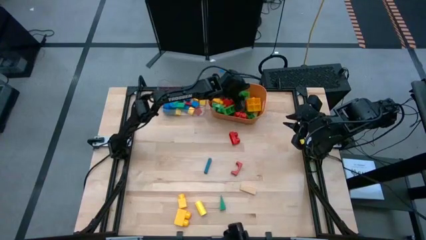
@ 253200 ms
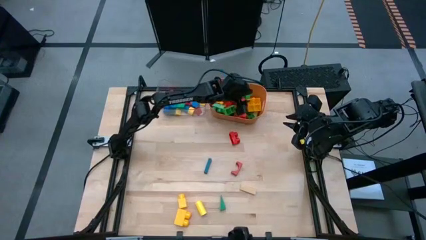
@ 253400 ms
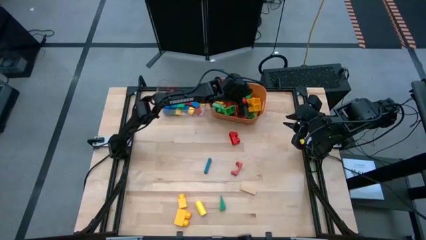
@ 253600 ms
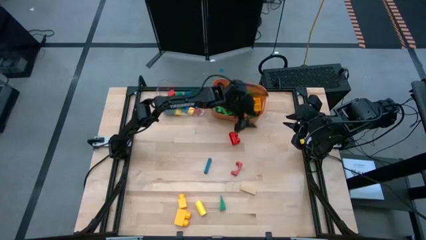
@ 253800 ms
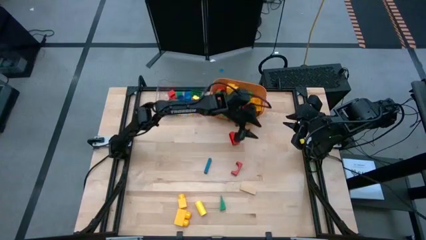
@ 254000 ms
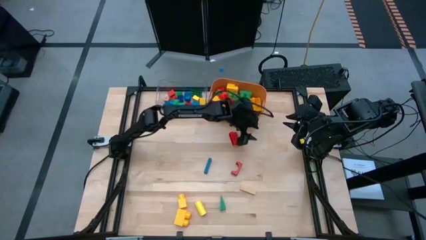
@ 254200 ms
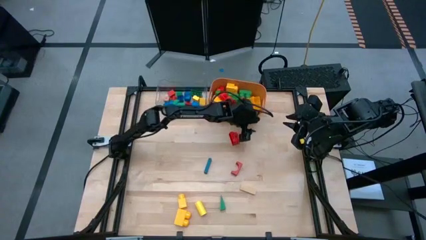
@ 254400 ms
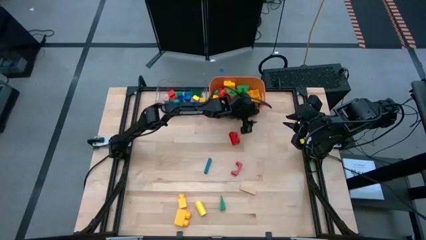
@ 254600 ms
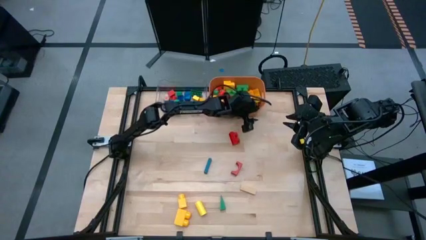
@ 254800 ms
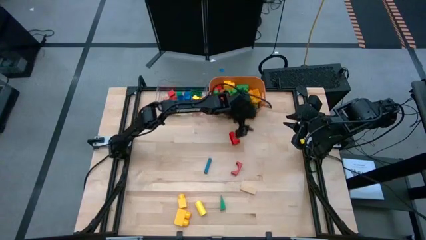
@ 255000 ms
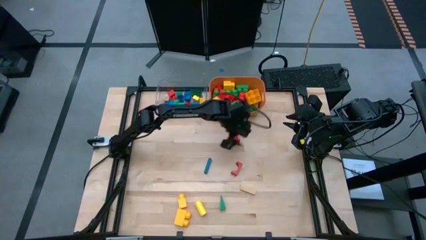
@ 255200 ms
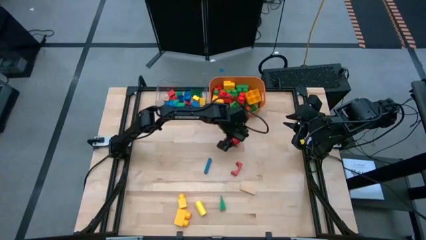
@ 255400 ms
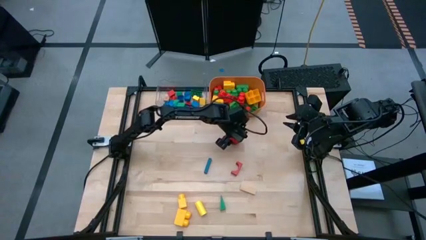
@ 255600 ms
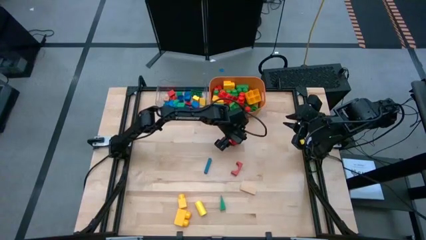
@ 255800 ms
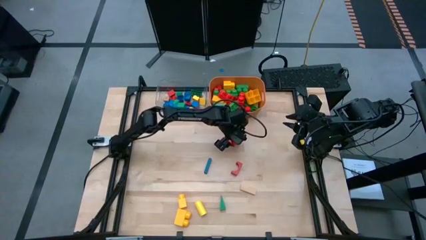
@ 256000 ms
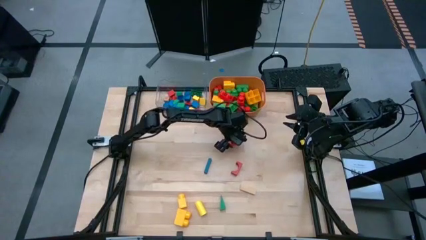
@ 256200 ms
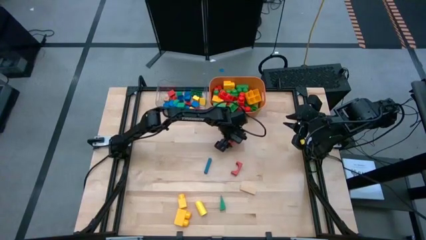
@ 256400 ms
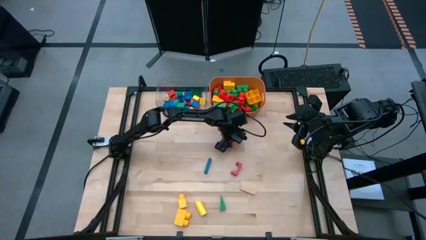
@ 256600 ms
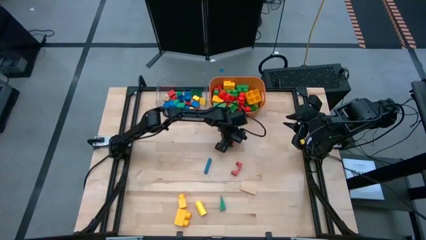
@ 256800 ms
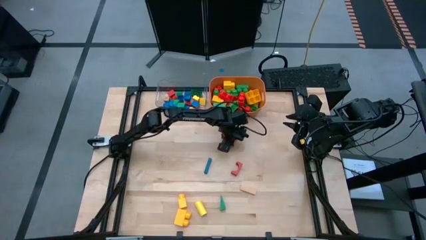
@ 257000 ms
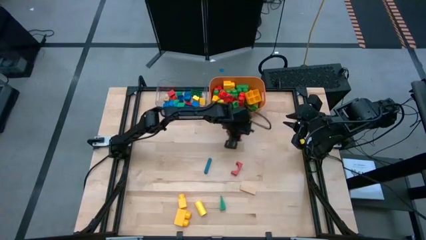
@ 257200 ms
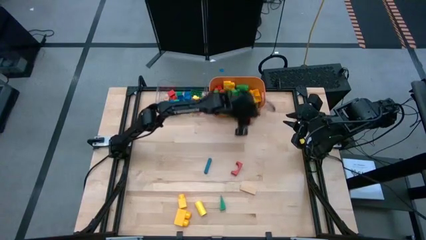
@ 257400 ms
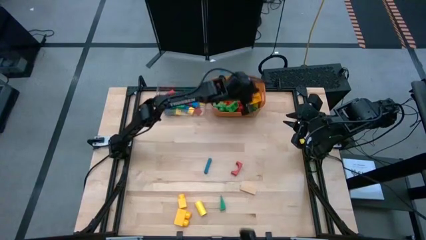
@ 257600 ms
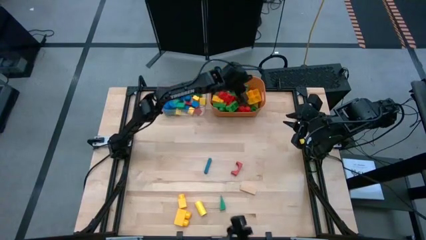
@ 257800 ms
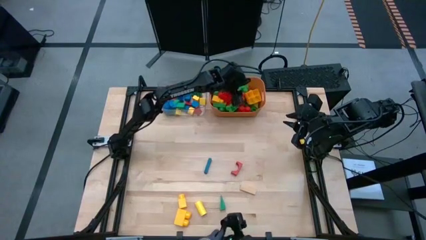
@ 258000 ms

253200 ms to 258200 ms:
Task: Sort blocks by size
Put the big red game piece into the orange bin

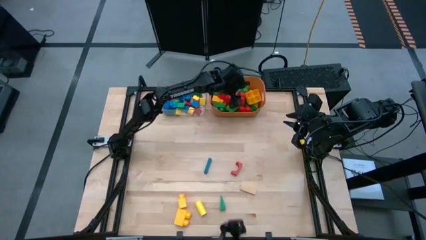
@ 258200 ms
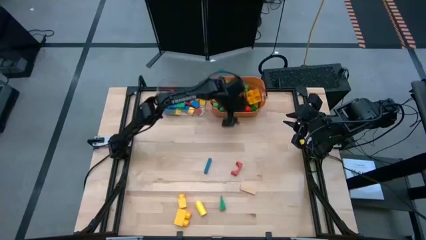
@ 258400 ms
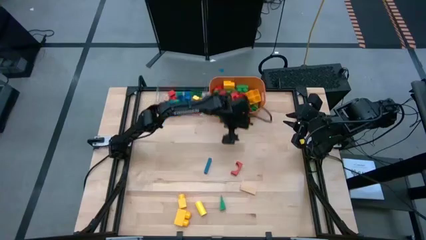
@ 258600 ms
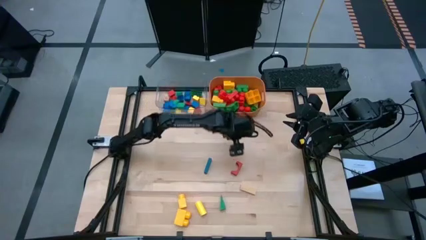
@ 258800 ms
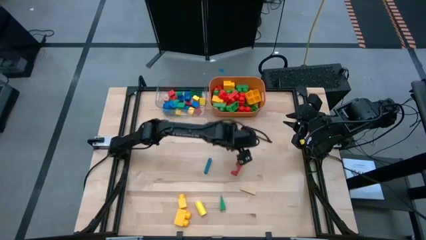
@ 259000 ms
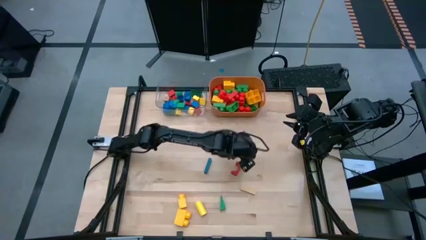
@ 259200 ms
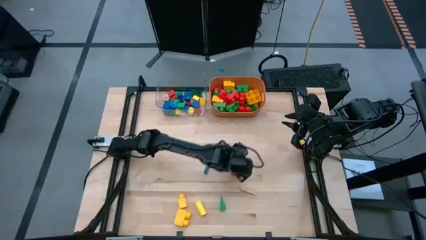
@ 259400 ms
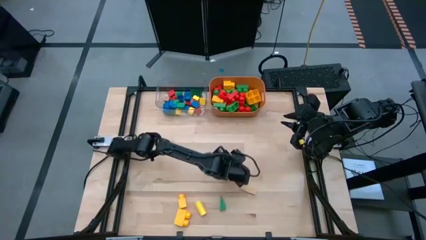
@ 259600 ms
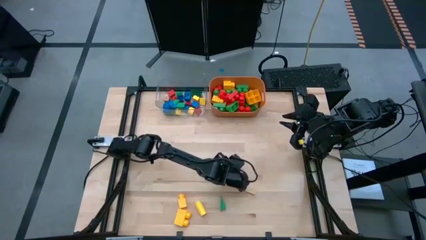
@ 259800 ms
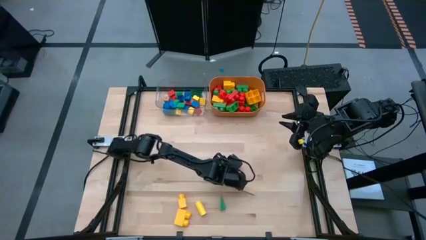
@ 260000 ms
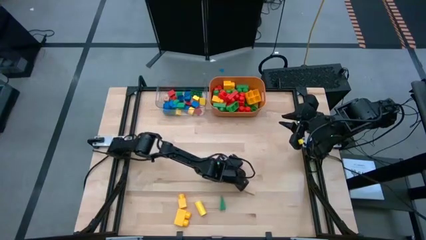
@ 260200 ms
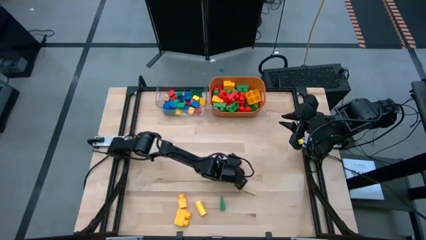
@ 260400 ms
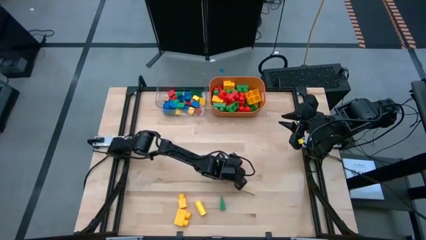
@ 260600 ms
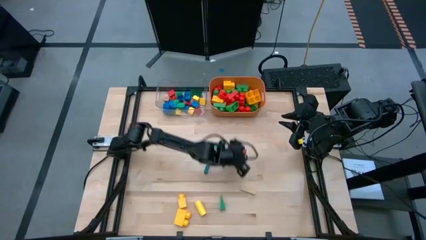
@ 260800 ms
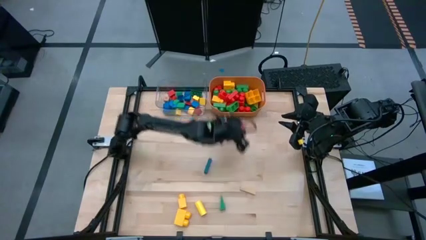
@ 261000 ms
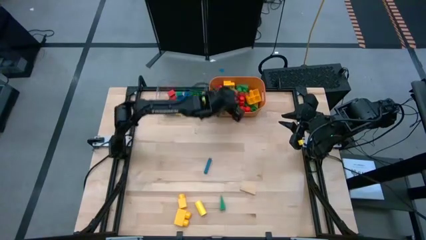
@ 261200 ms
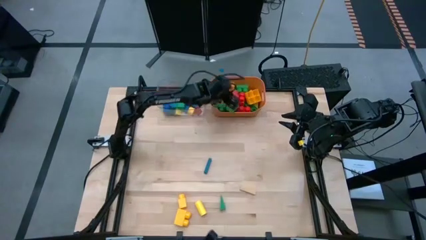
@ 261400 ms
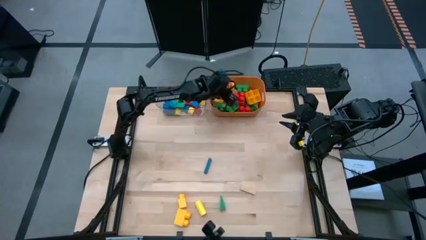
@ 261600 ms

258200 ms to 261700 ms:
Put the big red block into the orange bin

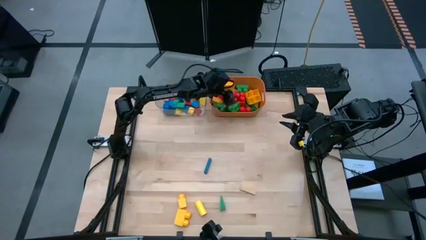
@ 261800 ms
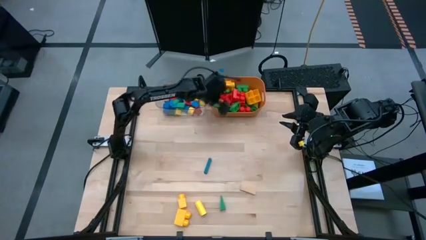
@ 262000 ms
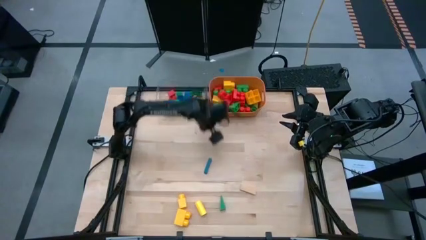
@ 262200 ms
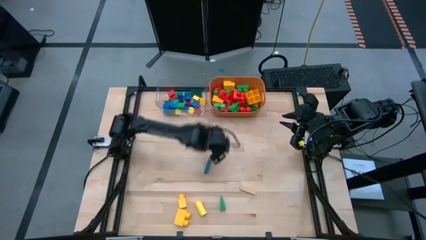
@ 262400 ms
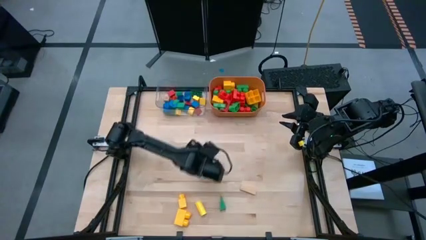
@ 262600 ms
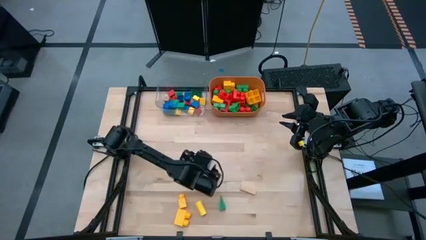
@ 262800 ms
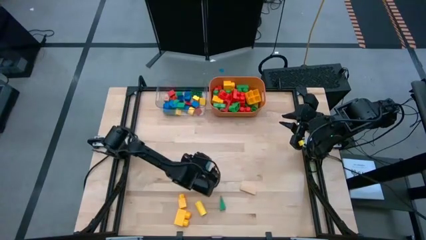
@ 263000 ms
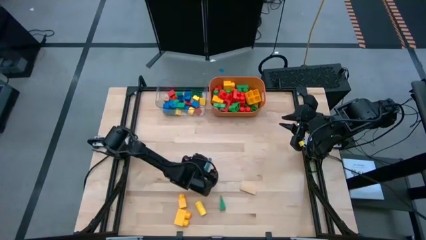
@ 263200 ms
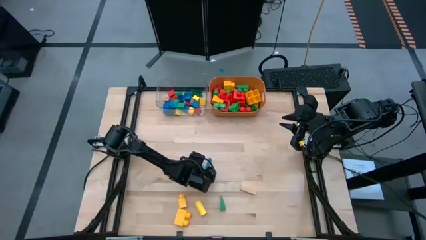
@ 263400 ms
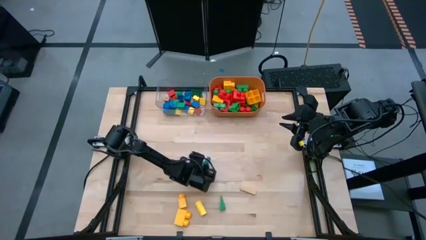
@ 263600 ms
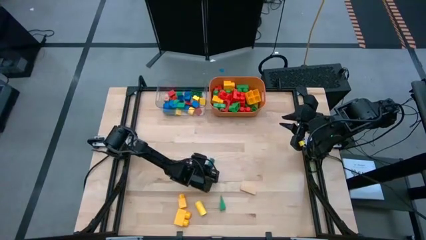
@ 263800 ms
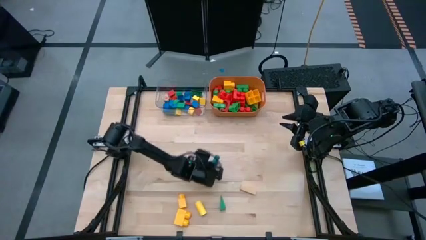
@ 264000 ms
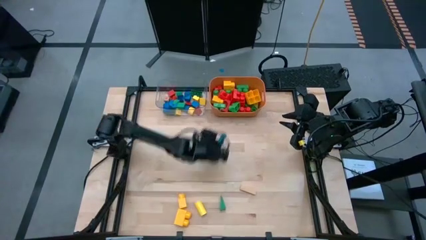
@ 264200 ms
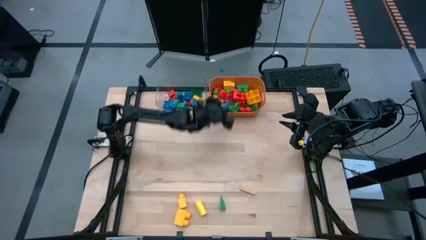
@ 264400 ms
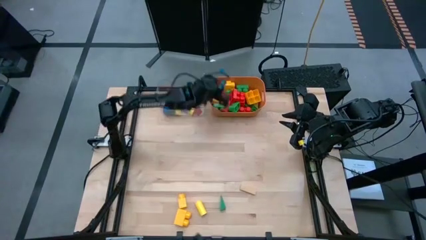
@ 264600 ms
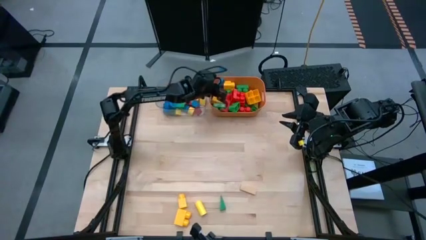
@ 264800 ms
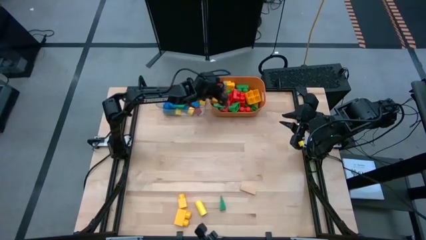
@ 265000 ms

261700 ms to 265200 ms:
Put the big blue block into the orange bin

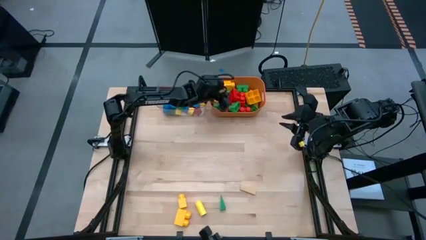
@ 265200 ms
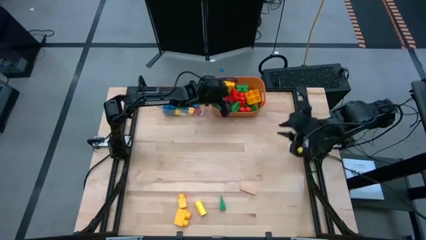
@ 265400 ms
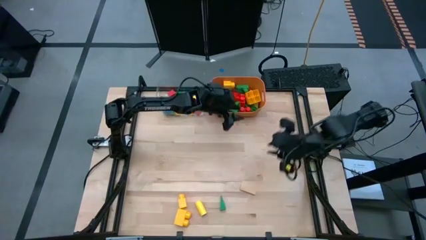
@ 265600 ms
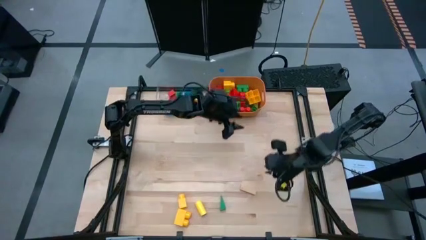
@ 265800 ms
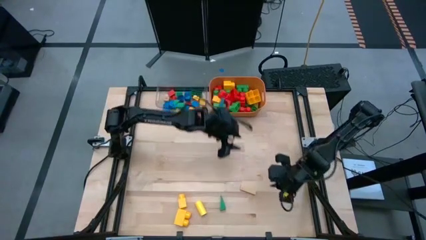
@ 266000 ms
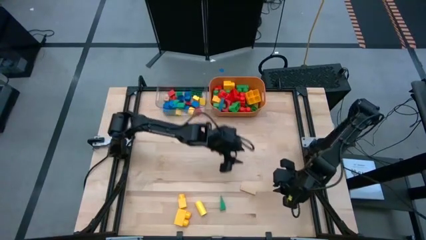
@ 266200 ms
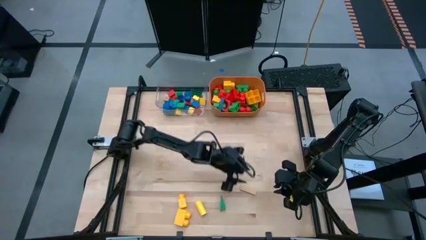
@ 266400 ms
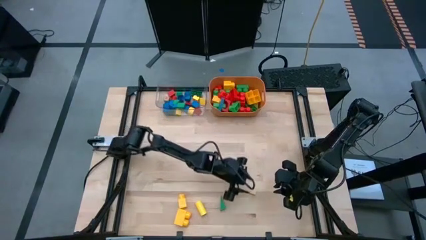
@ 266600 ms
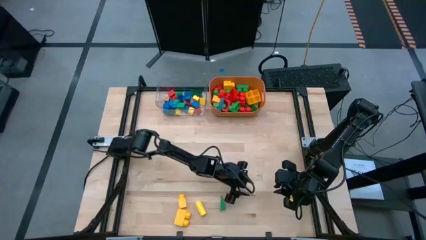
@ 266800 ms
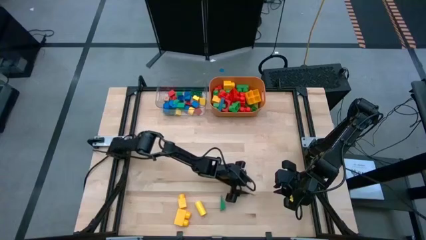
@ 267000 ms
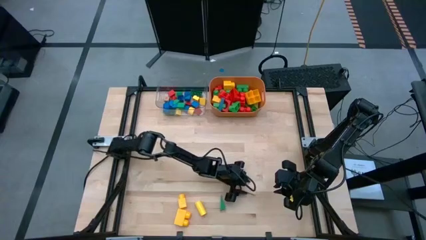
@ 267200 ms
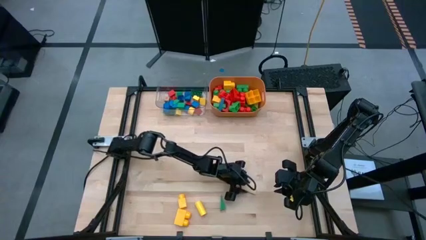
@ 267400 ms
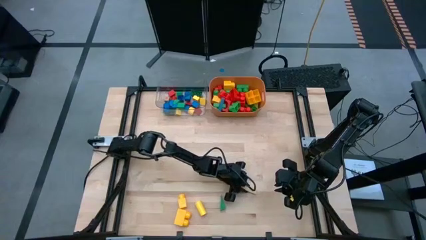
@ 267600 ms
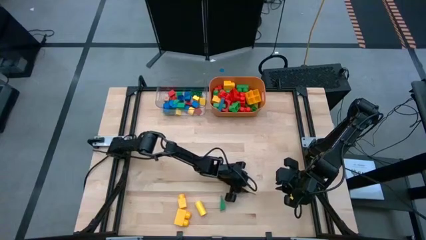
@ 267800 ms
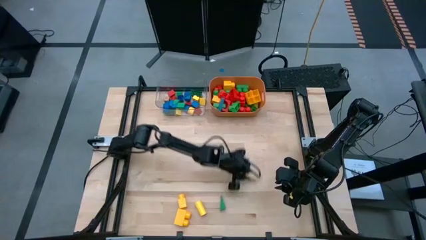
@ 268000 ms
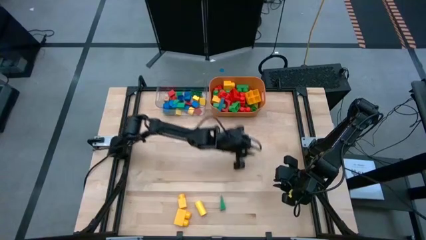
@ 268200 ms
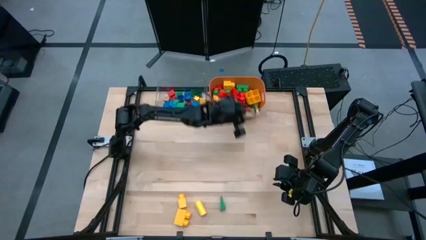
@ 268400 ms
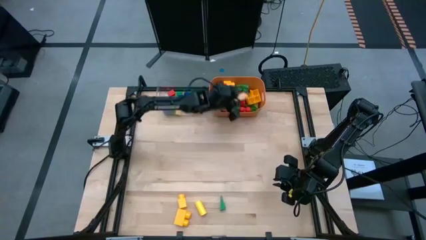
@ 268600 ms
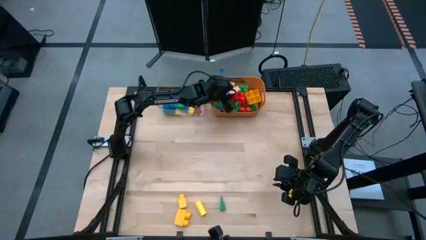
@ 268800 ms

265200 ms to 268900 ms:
Put the big brown block into the orange bin
